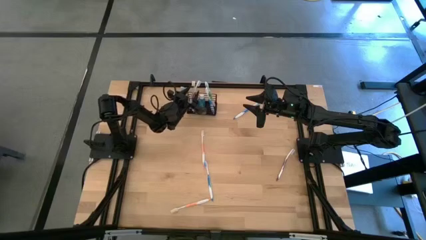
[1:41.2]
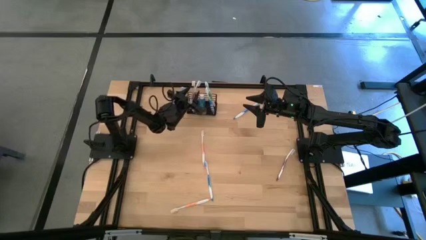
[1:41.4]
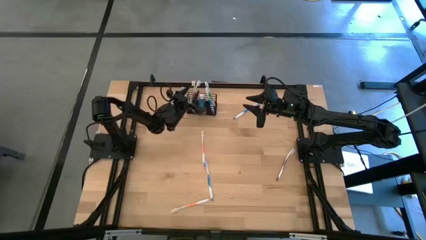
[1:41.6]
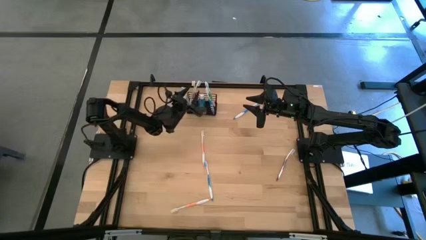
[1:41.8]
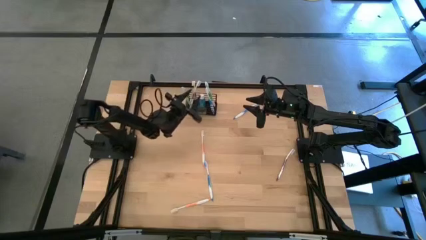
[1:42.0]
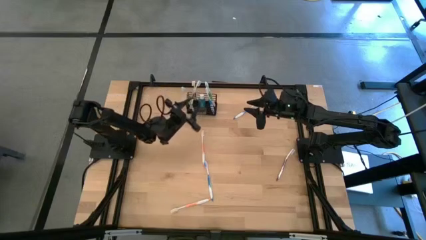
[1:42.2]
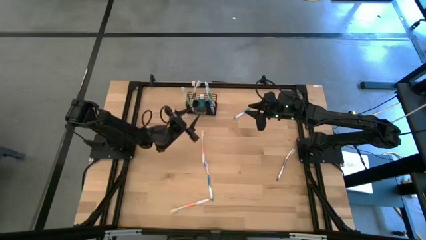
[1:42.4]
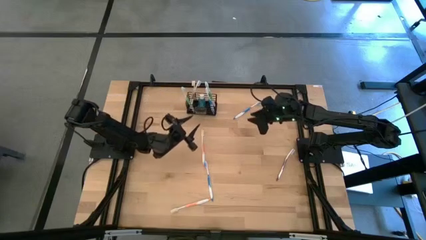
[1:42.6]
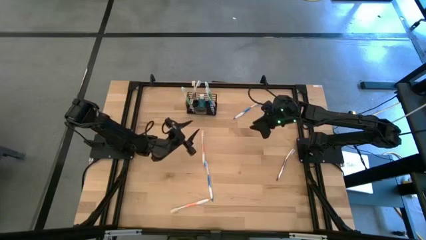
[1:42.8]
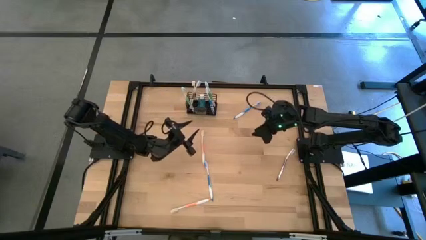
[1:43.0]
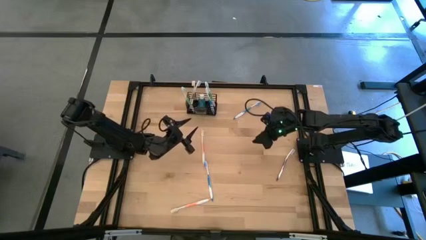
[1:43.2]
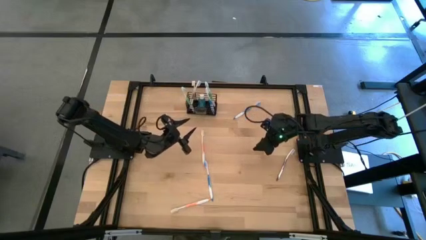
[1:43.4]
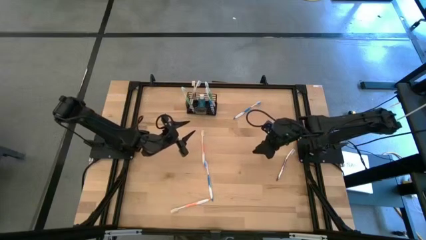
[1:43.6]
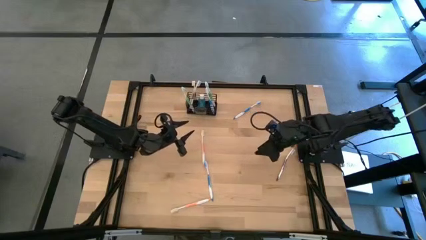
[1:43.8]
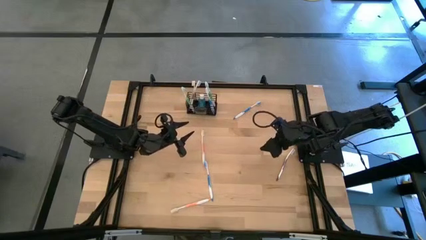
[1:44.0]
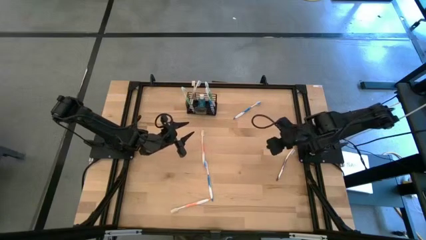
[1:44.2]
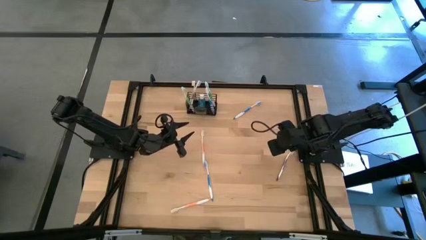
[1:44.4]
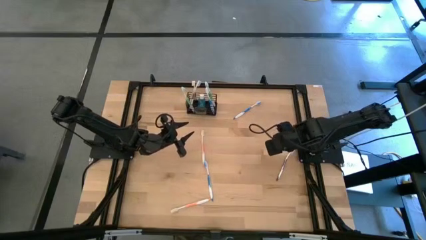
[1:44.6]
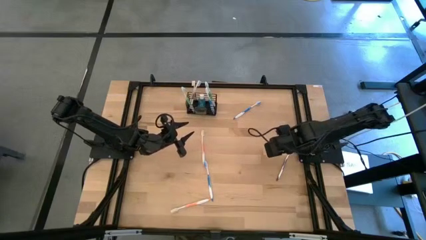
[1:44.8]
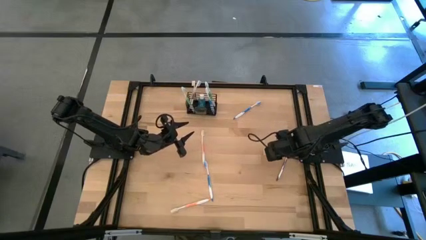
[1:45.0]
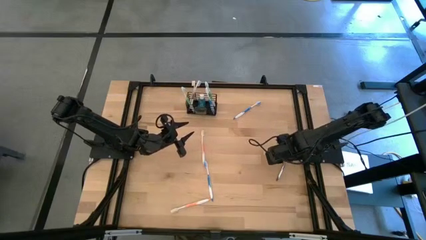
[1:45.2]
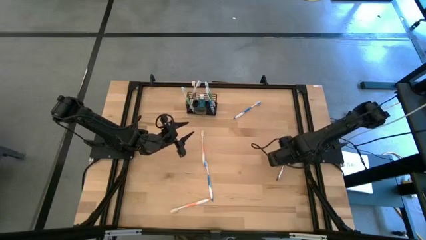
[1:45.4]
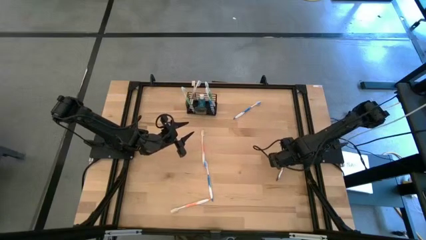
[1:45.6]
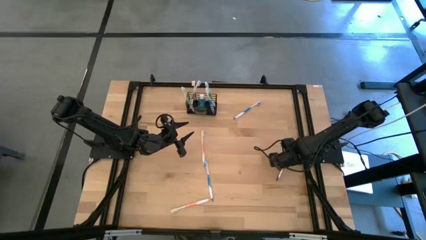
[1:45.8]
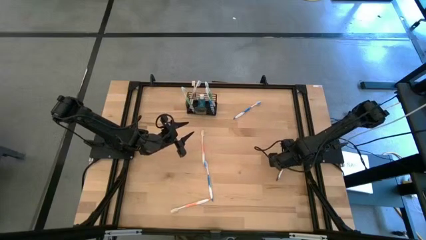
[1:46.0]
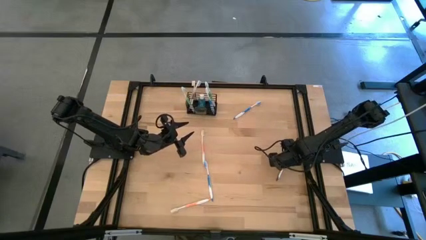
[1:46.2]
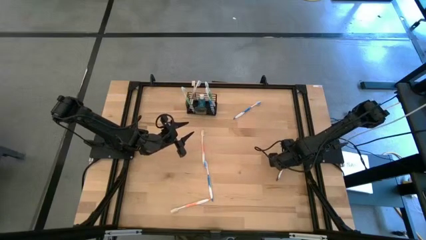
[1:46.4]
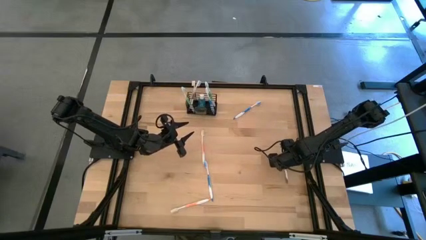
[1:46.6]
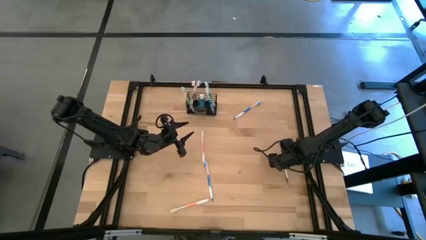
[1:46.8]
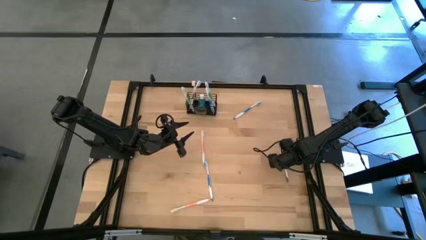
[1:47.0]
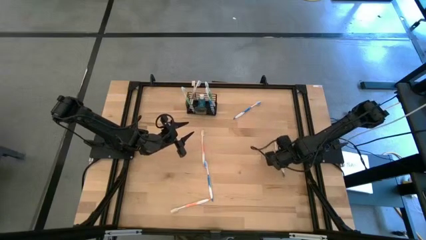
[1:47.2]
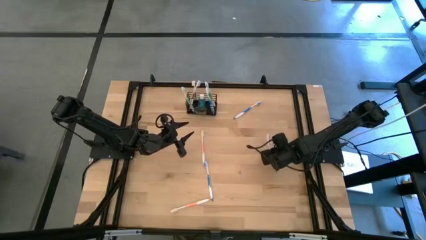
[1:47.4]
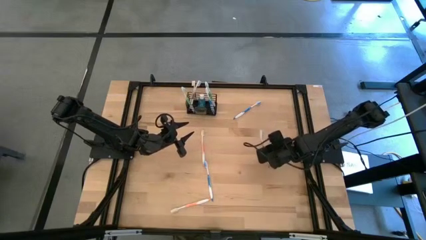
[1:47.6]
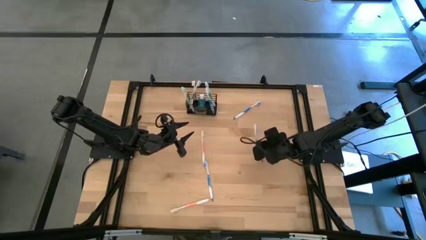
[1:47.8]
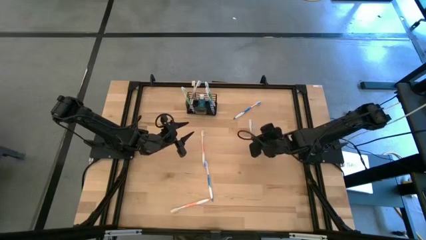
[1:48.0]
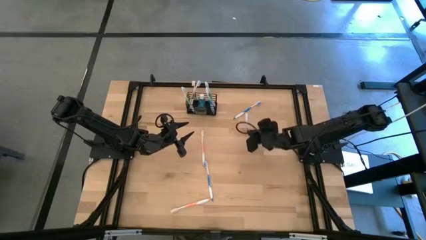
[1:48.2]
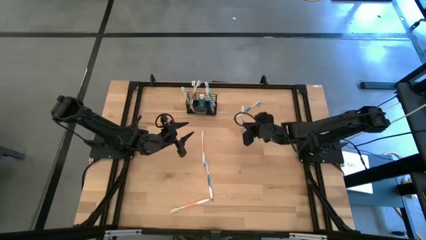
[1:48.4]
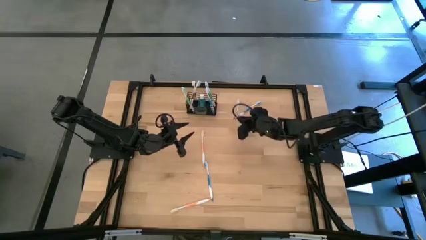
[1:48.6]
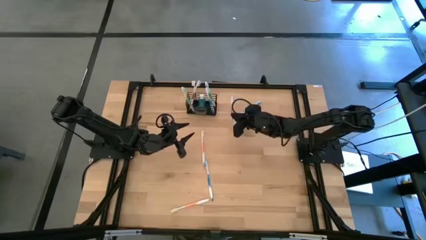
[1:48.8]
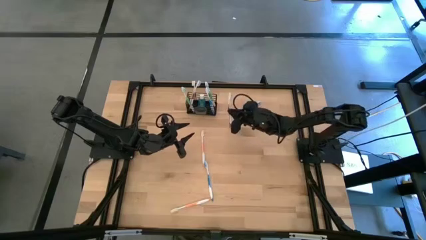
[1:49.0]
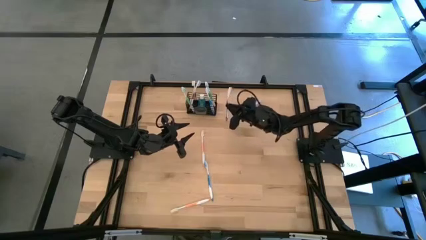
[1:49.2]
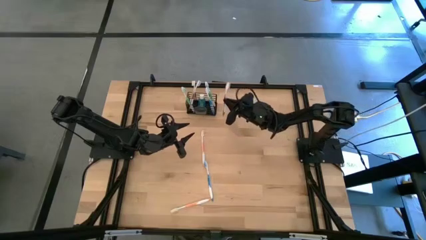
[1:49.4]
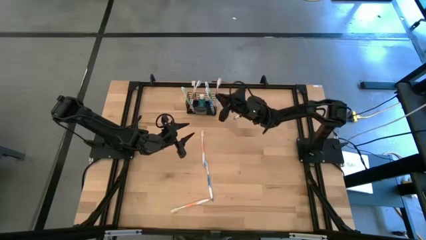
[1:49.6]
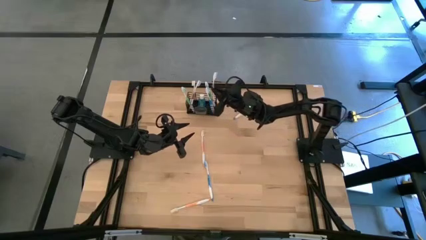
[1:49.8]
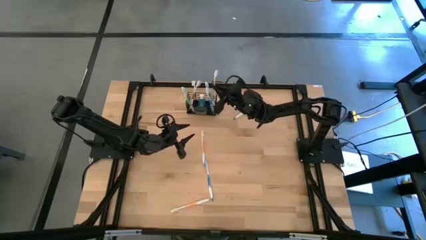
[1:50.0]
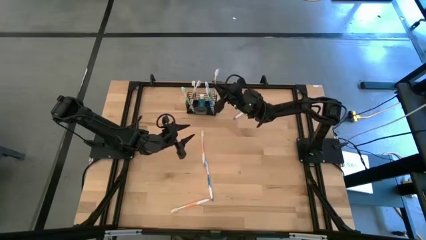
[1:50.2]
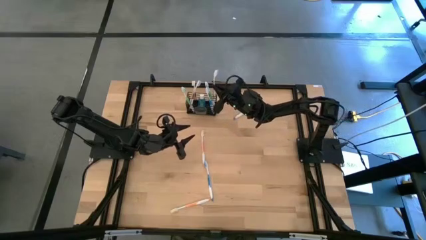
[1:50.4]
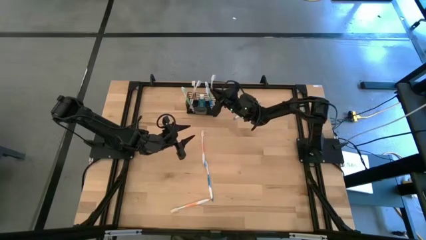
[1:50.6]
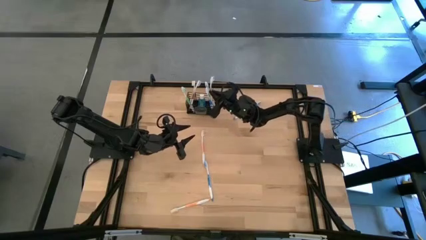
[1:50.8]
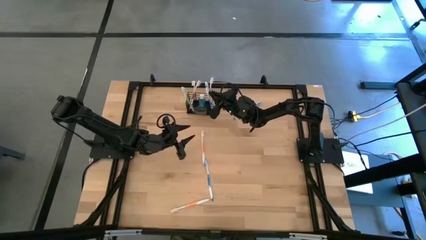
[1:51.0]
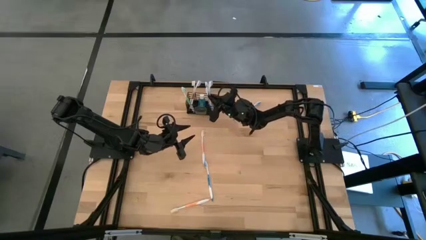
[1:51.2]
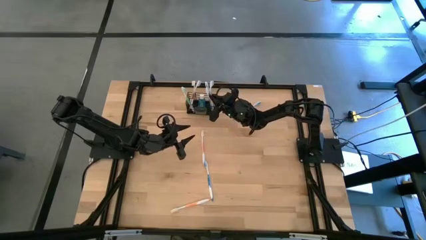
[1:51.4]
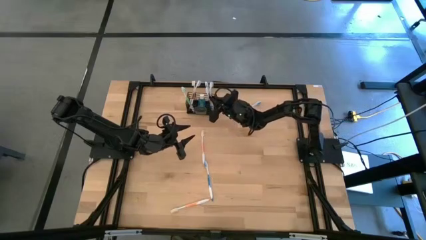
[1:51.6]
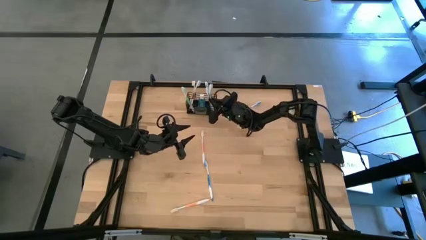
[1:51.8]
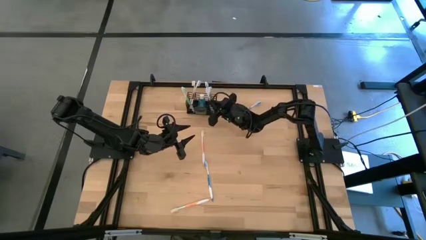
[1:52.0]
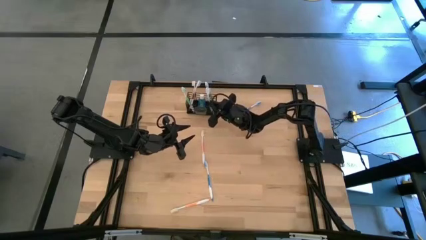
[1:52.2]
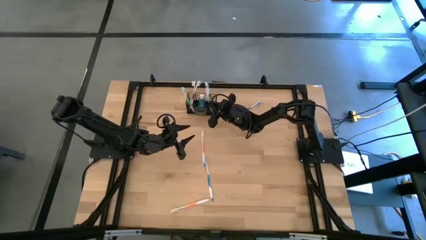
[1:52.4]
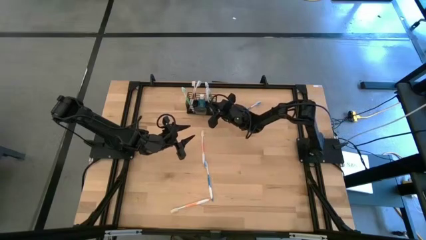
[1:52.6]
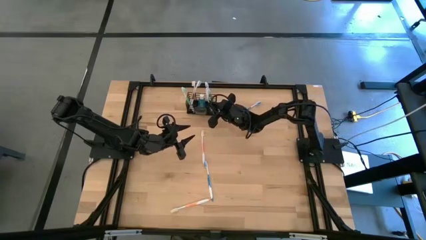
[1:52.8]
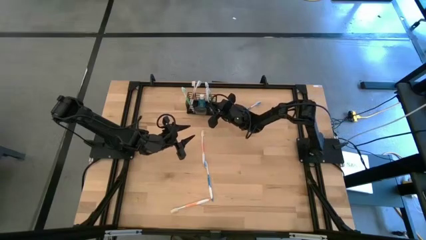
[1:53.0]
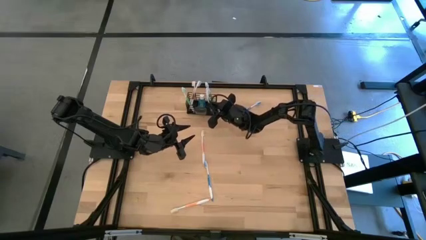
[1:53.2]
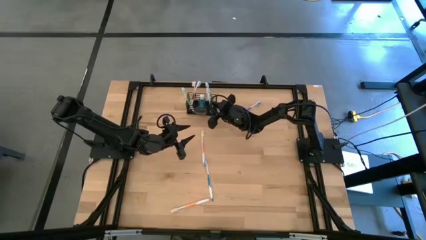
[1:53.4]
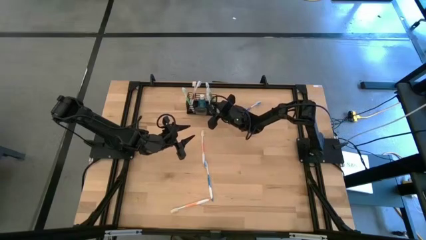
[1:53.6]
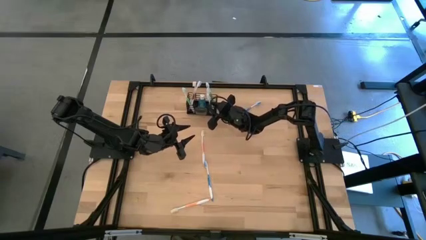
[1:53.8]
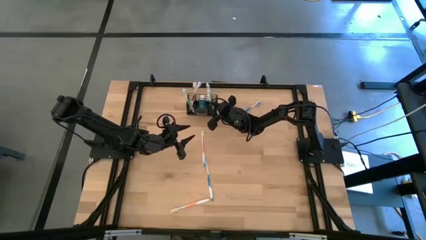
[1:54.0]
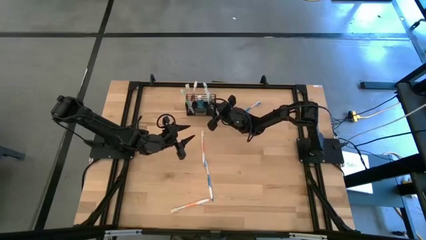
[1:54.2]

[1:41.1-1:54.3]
Task: Pick & Place toothbrushing station
Put the violet toothbrush into the black wire organizer
